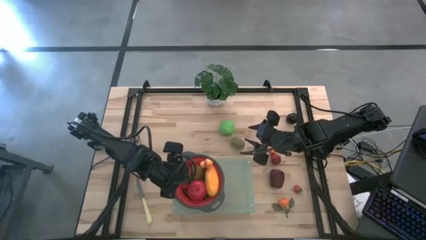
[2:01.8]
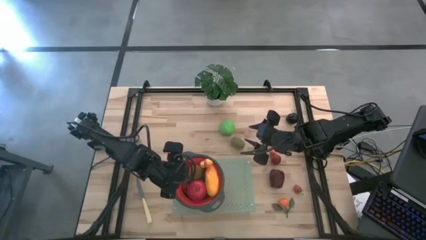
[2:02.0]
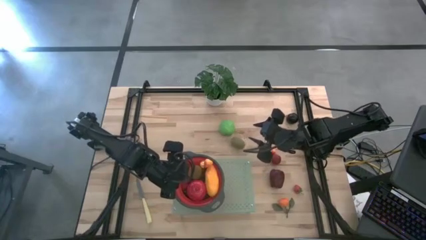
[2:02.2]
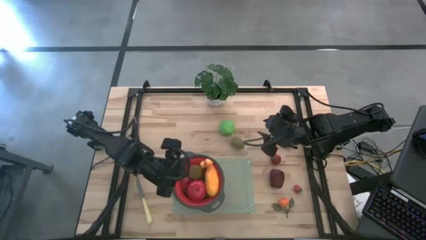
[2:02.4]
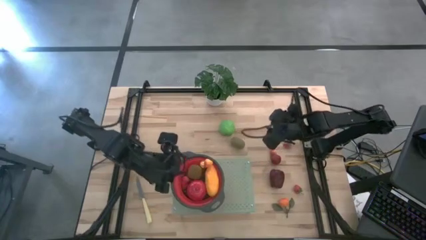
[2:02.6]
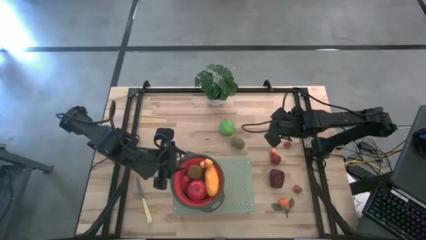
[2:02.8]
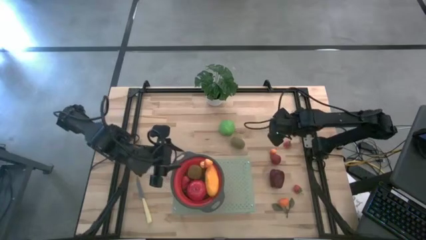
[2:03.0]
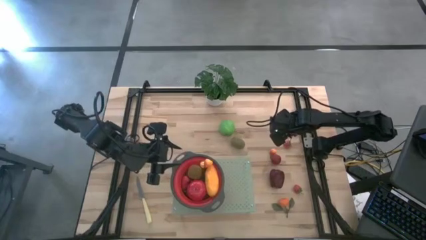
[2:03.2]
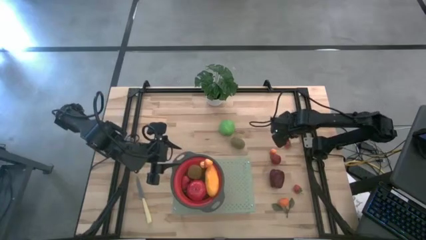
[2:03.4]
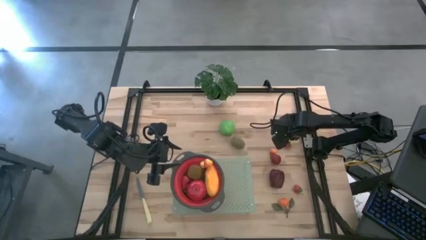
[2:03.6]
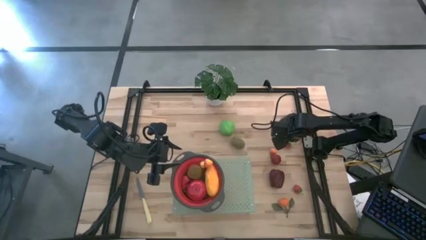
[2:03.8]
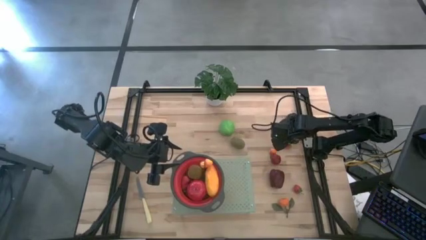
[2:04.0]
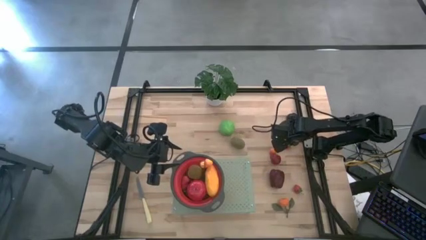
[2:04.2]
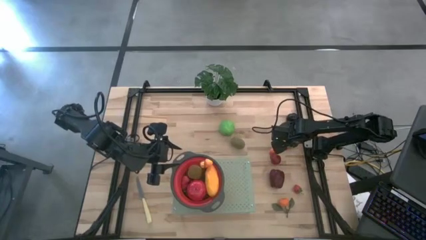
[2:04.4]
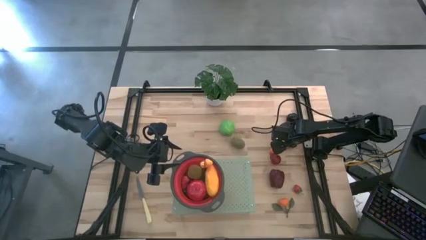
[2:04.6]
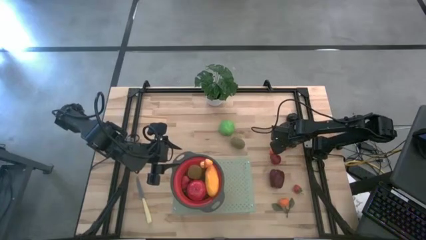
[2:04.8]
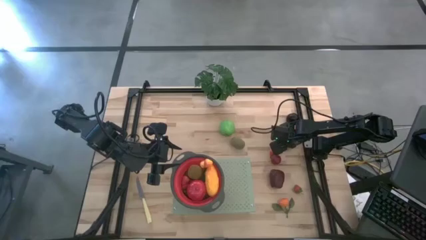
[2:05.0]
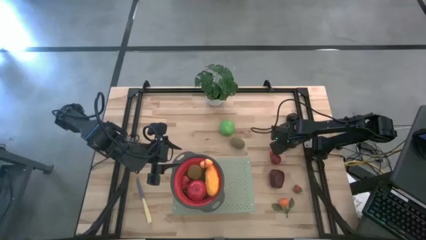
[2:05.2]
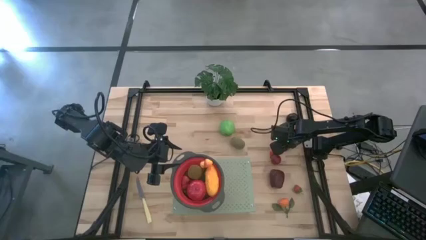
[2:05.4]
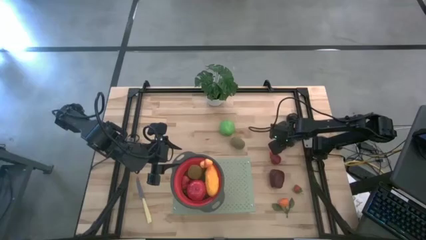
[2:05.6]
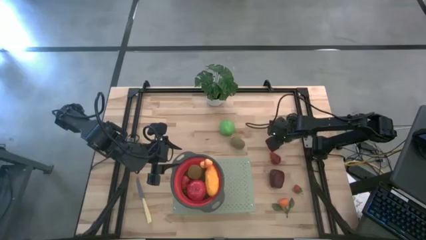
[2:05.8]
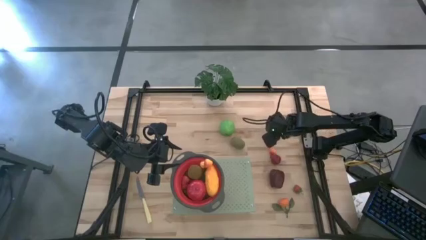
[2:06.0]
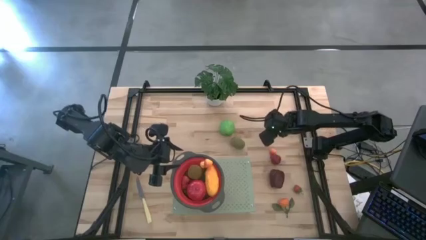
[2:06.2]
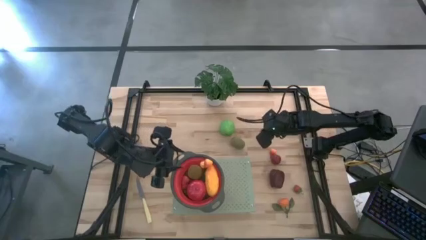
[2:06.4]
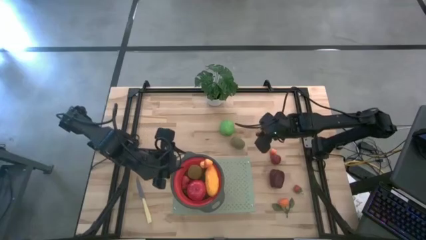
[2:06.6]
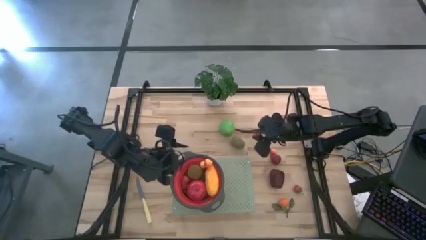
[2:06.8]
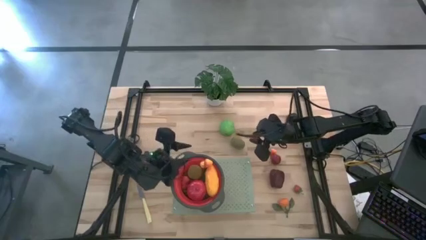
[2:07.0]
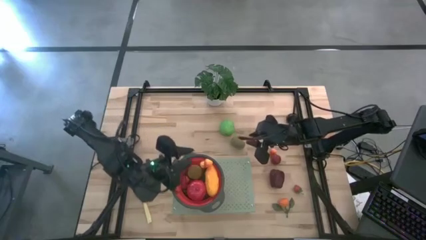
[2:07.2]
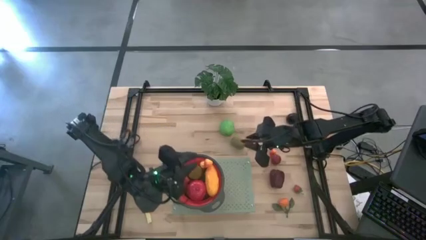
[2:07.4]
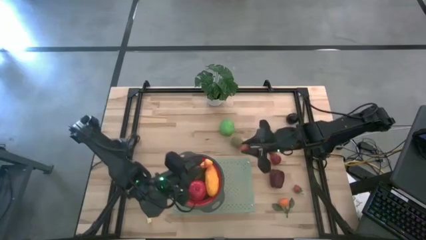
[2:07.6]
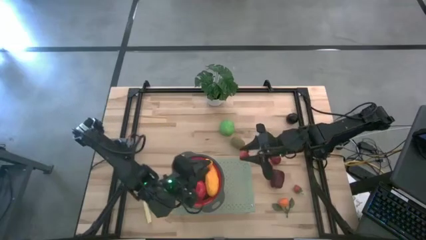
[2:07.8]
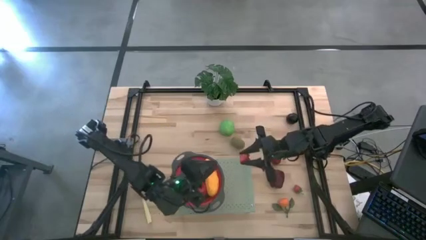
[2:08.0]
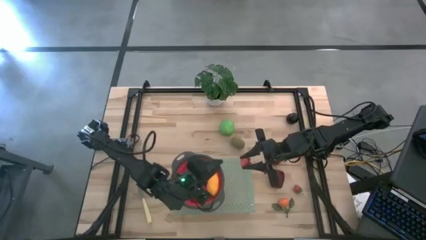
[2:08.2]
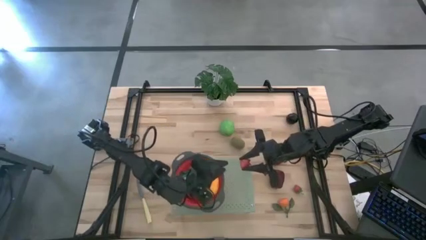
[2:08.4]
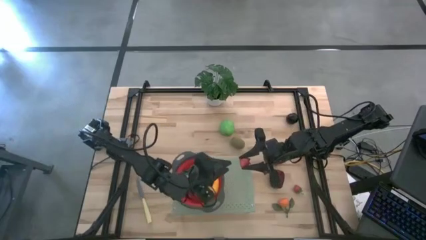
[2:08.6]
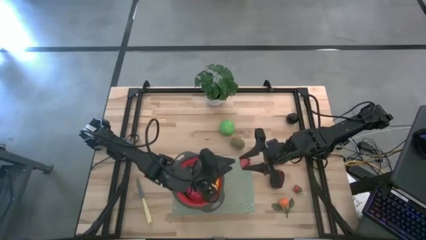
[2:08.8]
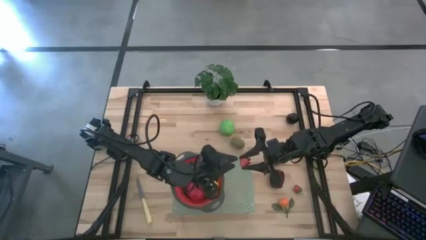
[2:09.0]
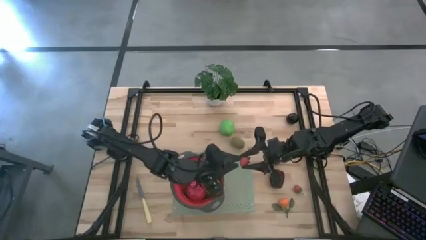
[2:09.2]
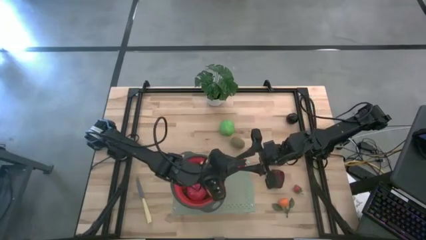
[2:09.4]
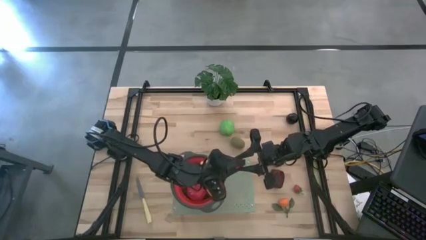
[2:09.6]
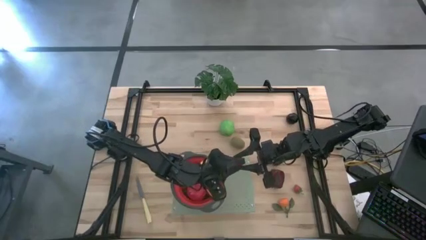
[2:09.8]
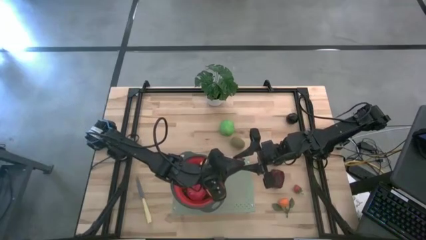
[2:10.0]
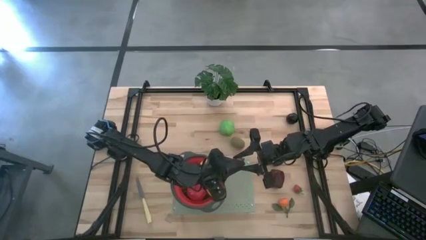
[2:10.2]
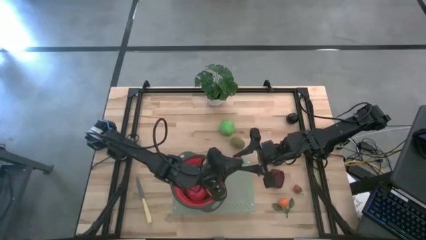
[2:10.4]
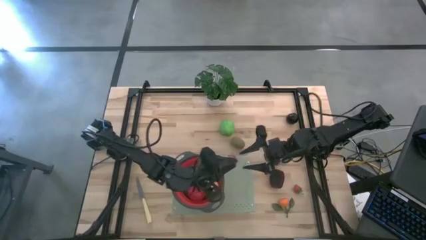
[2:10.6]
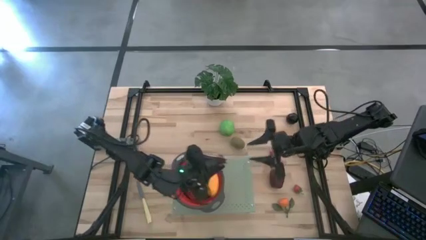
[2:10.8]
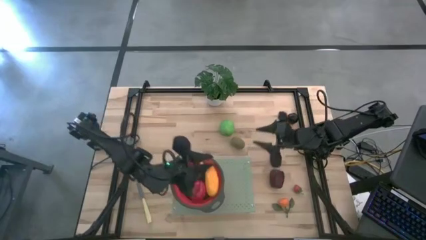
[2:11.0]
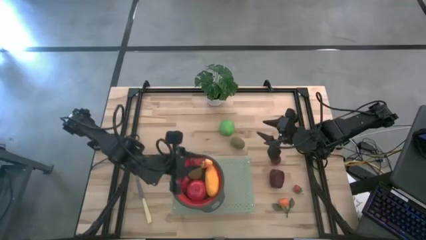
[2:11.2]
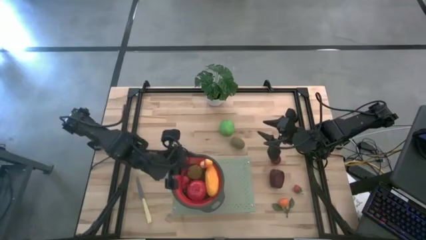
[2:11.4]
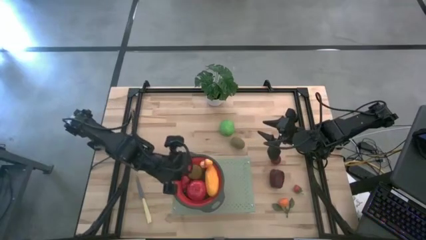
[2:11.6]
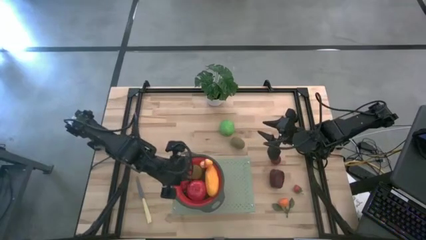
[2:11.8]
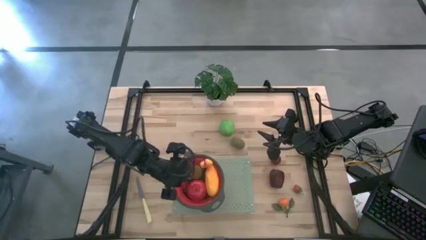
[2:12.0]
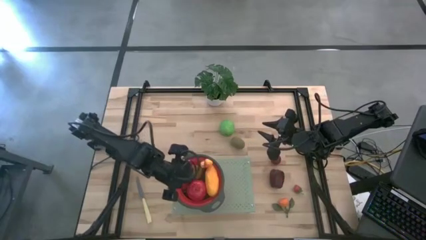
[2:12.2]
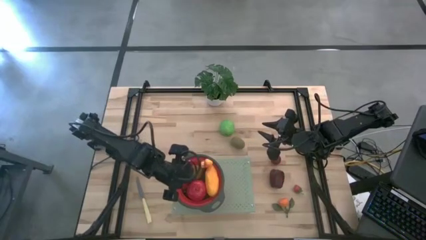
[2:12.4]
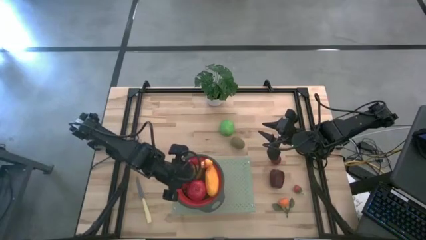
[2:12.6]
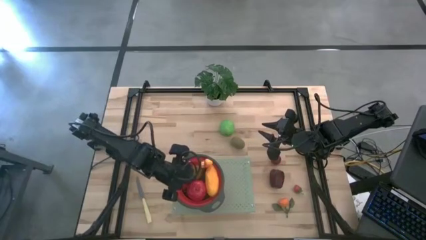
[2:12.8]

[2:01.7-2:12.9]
Task: Pick & Place Fruit
Put the top strawberry into the red strainer

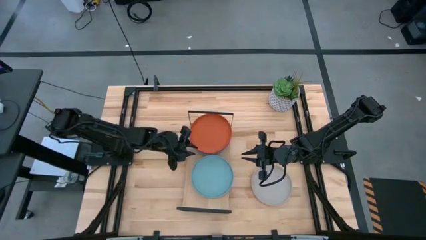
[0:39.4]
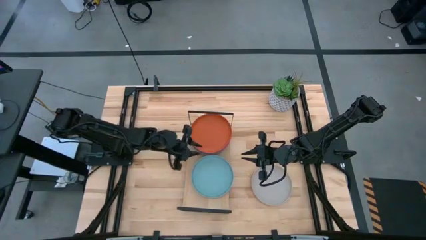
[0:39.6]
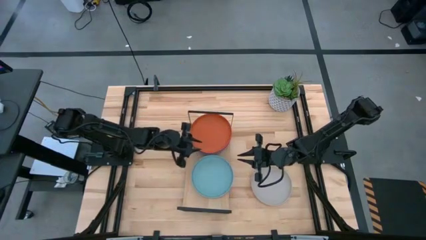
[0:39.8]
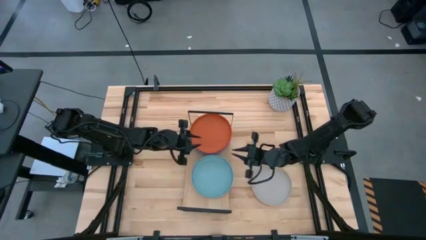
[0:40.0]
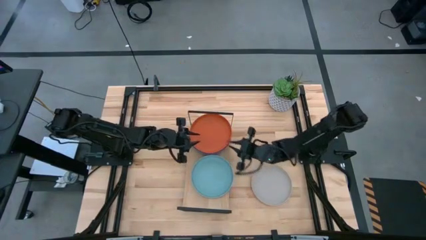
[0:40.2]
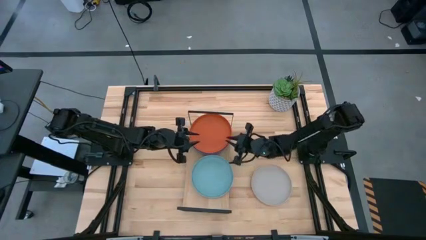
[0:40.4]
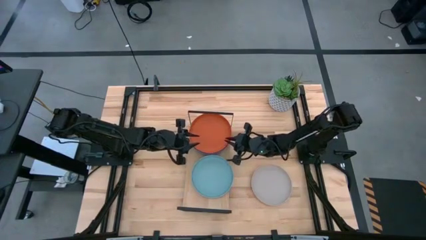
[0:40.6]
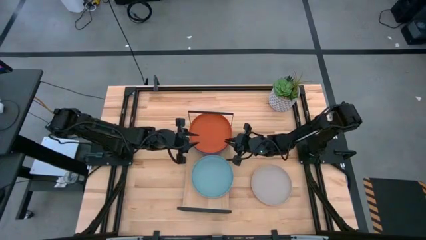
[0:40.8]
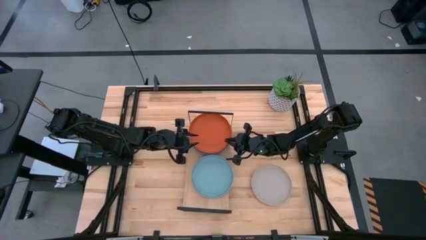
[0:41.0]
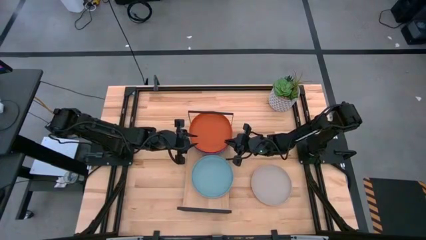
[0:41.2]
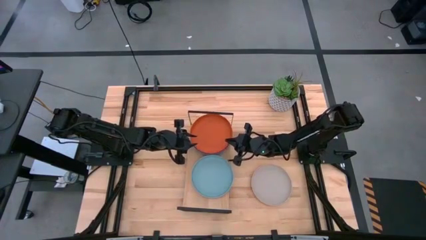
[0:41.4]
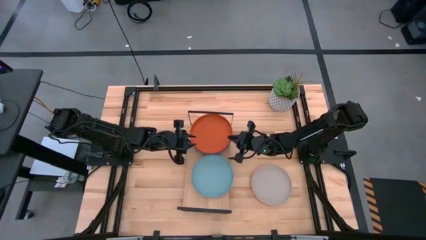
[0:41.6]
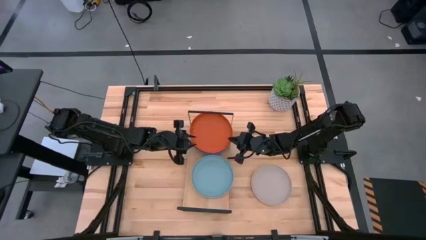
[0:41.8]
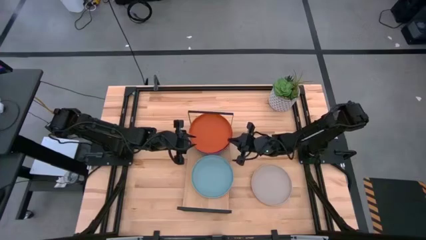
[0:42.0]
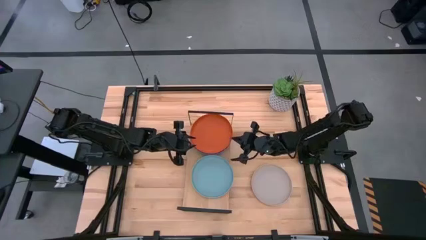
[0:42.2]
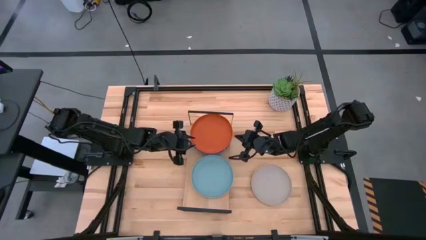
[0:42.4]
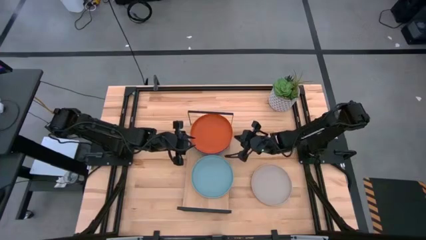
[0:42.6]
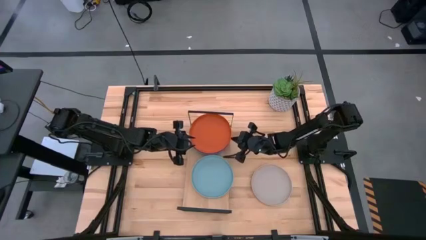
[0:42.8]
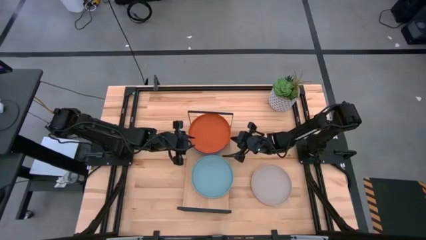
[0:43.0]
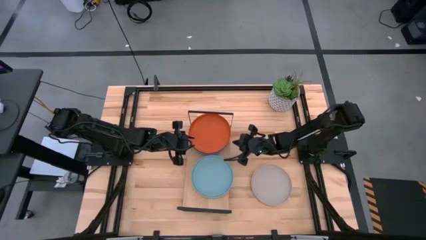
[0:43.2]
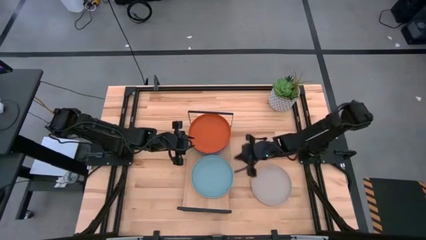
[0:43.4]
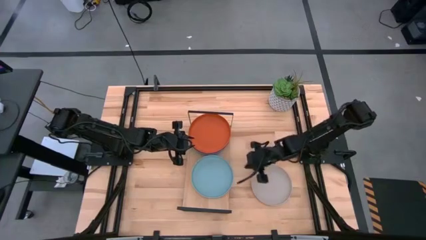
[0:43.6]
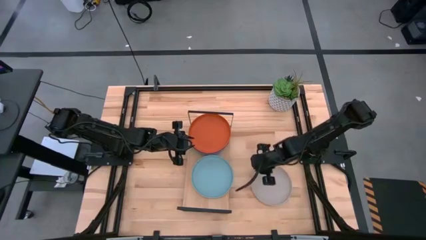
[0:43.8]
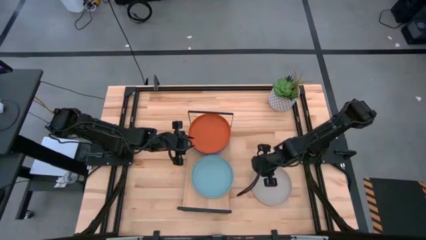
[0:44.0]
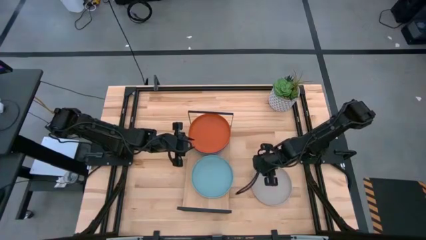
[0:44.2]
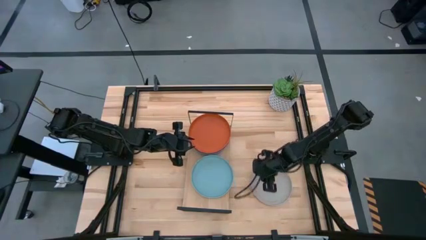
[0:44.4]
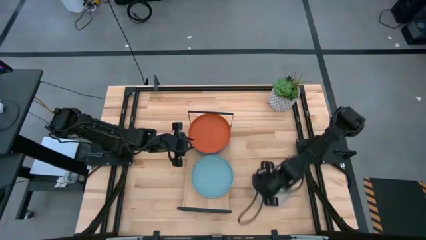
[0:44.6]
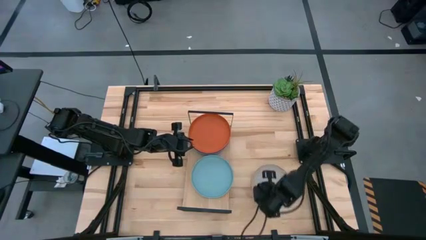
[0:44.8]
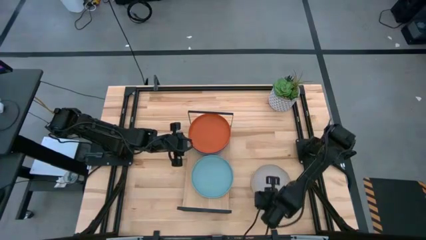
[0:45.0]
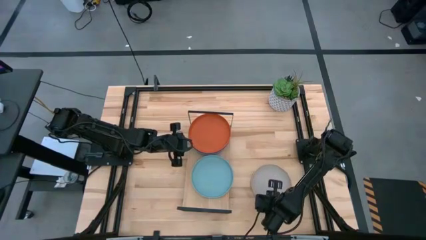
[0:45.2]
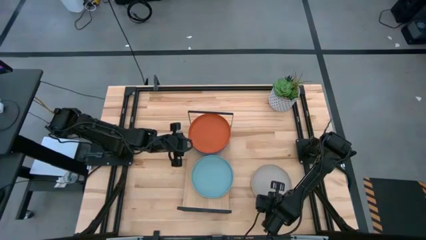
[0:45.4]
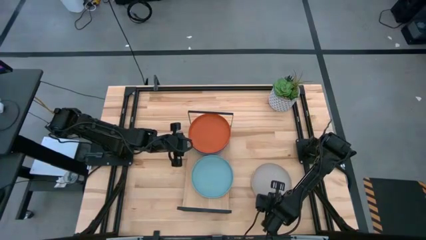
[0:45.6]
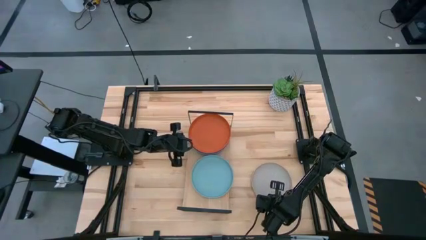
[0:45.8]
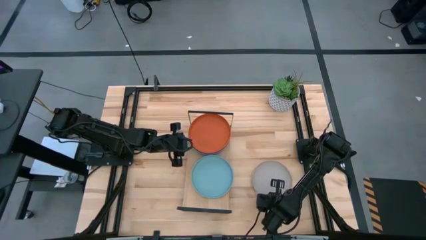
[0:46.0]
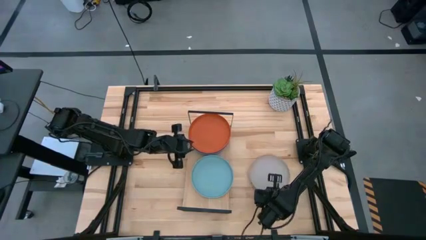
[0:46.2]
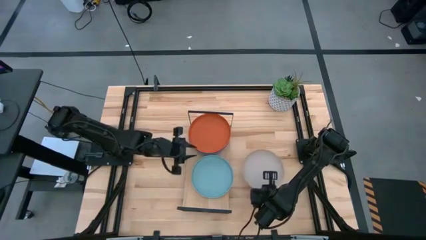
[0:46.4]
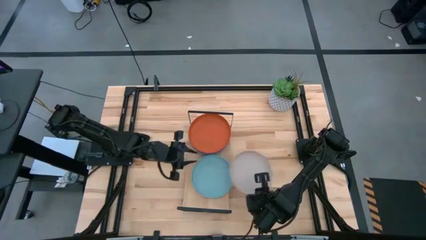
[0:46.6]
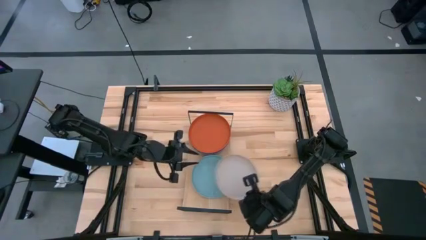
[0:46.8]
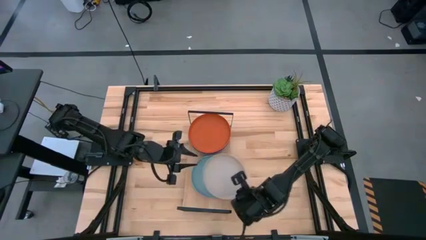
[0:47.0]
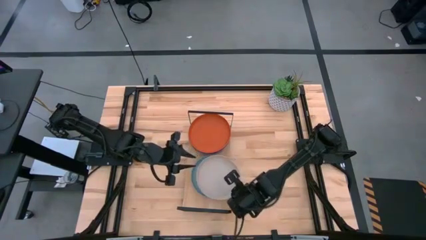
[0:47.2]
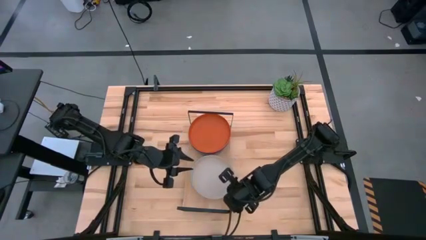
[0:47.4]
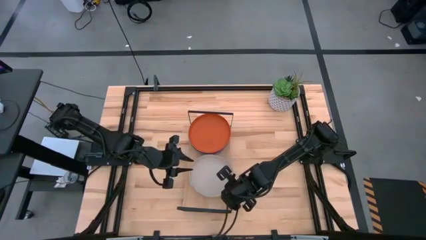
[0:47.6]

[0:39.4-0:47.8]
Task: Place and stack plates onto a shelf
Stack the gray plate on top of the light blue plate
